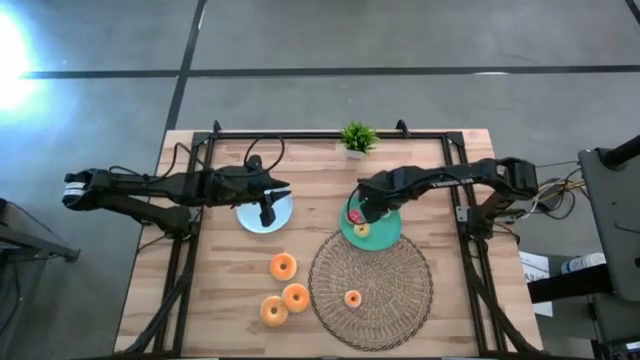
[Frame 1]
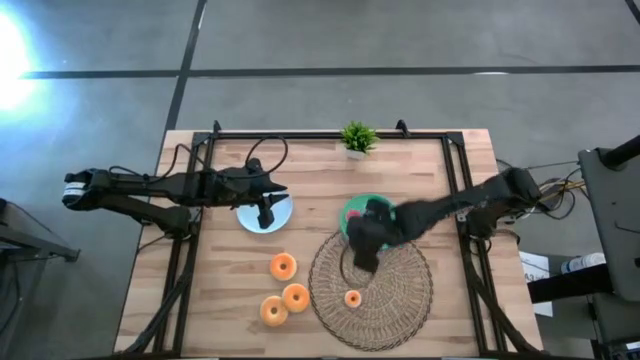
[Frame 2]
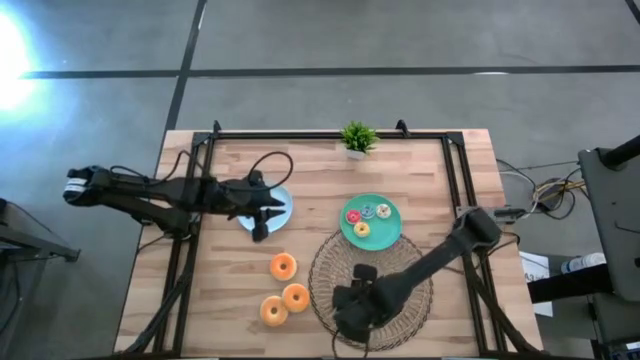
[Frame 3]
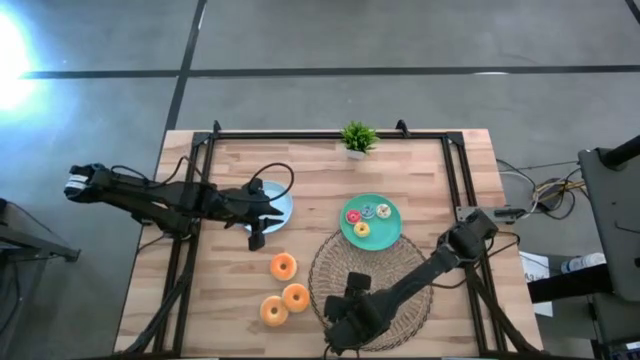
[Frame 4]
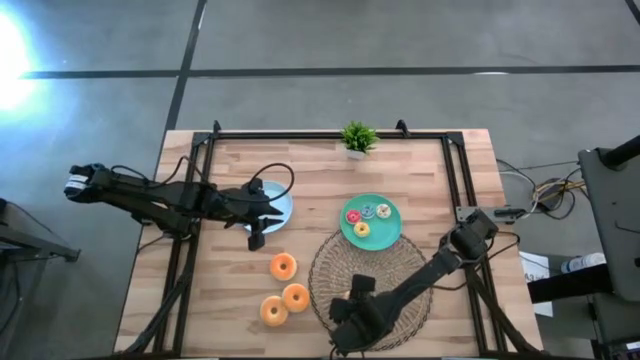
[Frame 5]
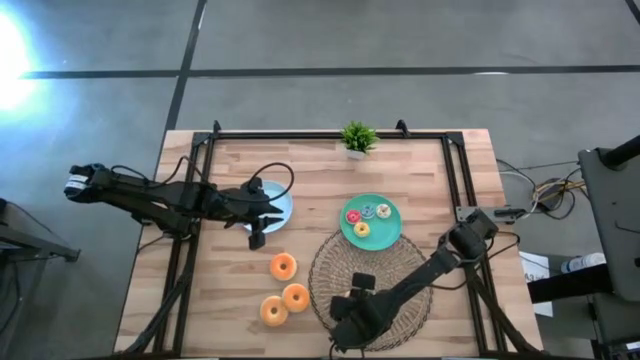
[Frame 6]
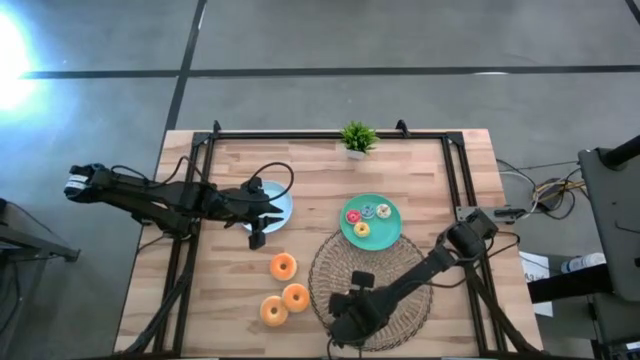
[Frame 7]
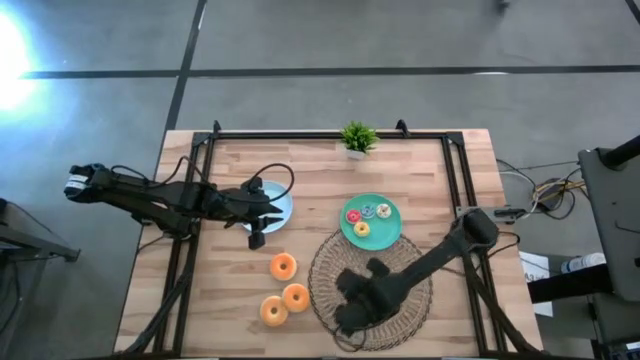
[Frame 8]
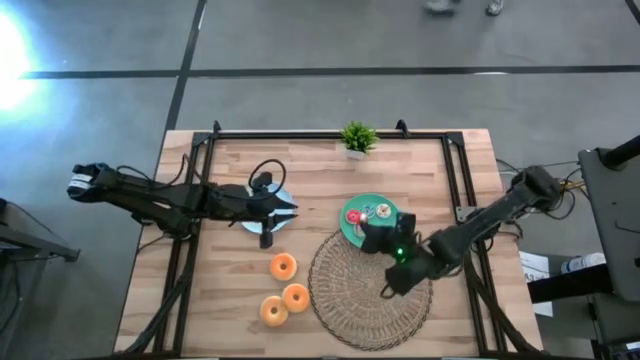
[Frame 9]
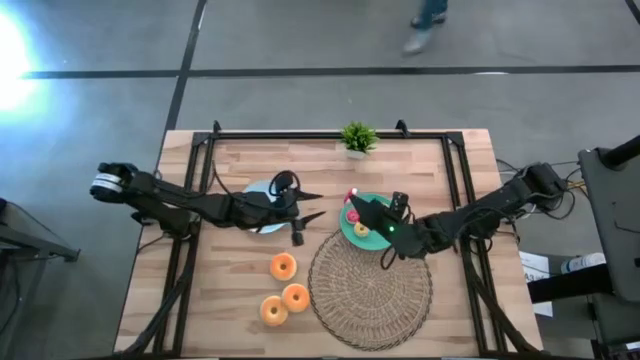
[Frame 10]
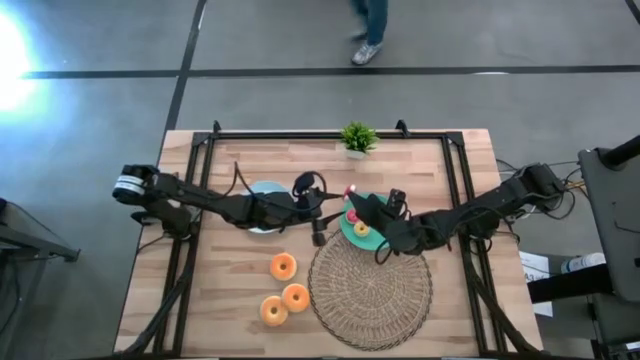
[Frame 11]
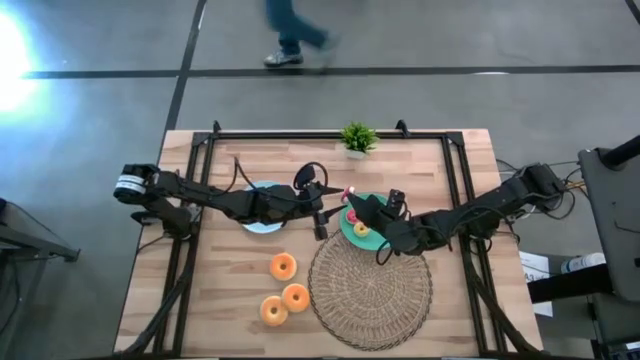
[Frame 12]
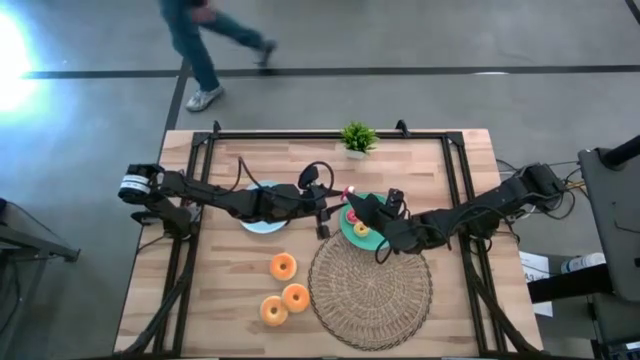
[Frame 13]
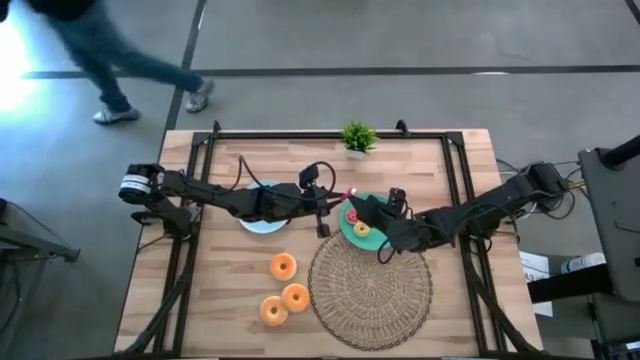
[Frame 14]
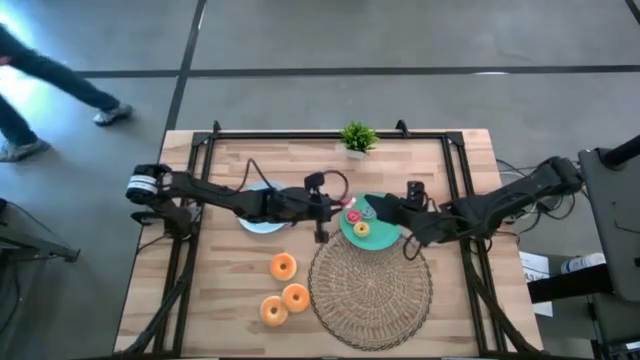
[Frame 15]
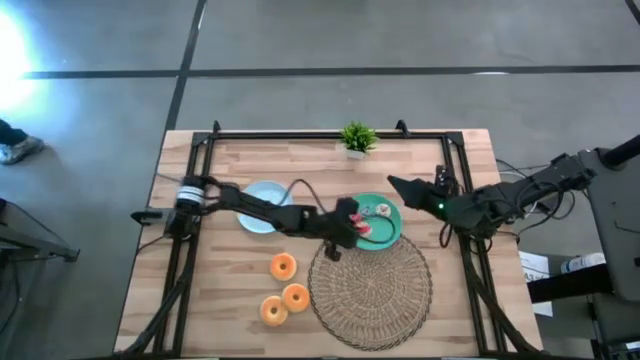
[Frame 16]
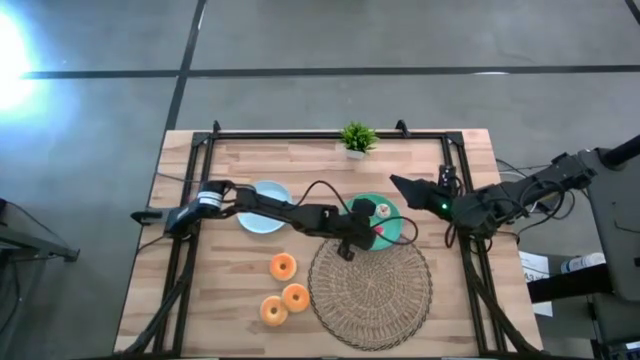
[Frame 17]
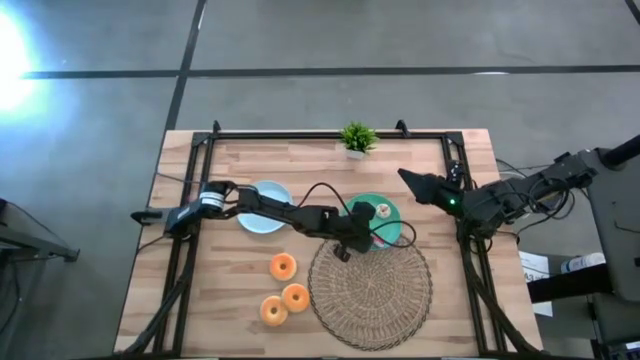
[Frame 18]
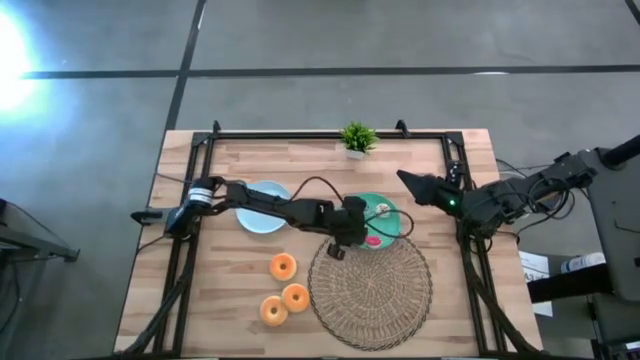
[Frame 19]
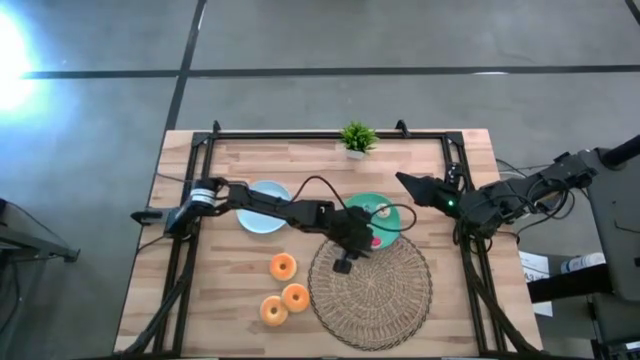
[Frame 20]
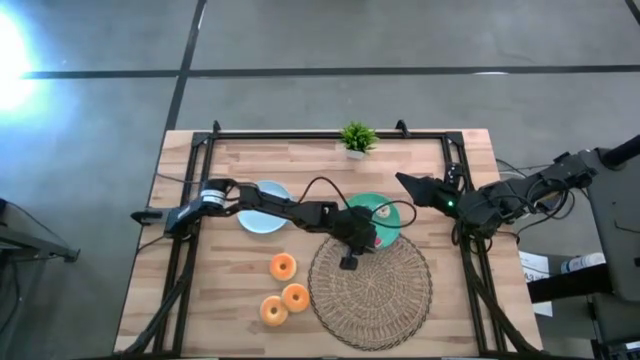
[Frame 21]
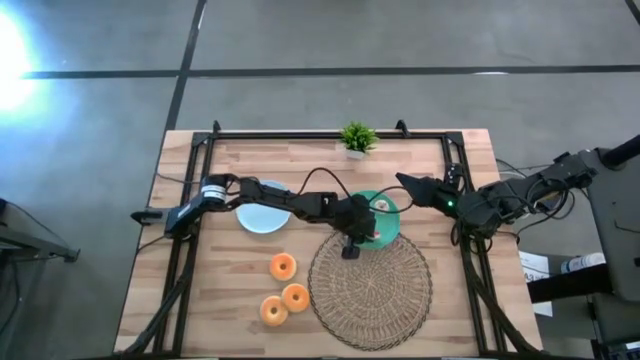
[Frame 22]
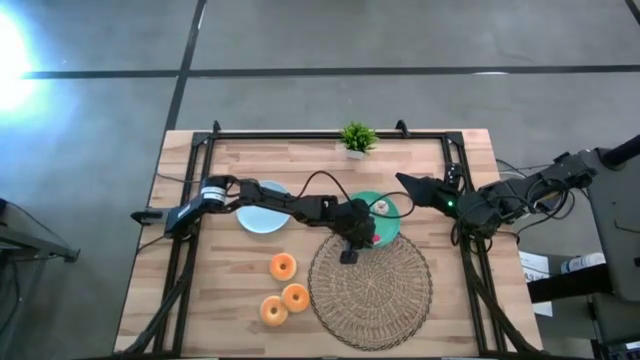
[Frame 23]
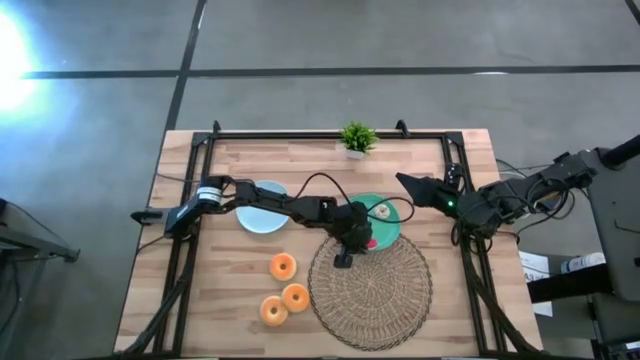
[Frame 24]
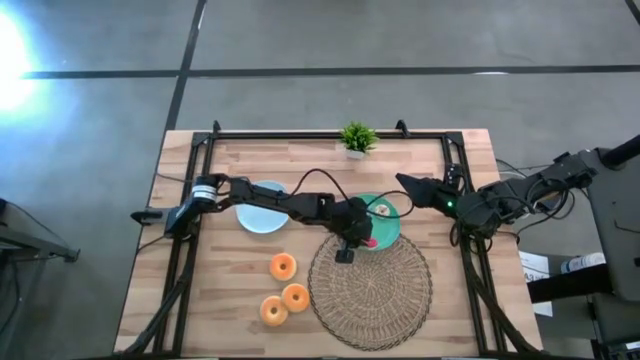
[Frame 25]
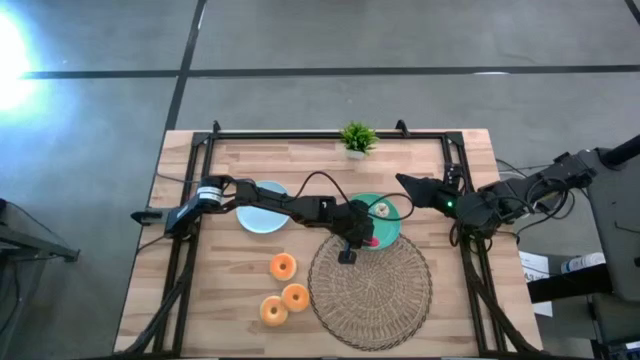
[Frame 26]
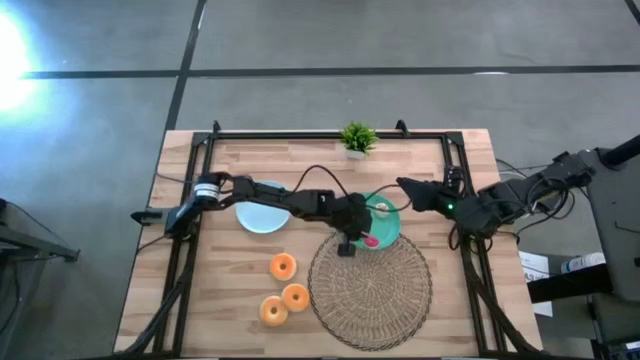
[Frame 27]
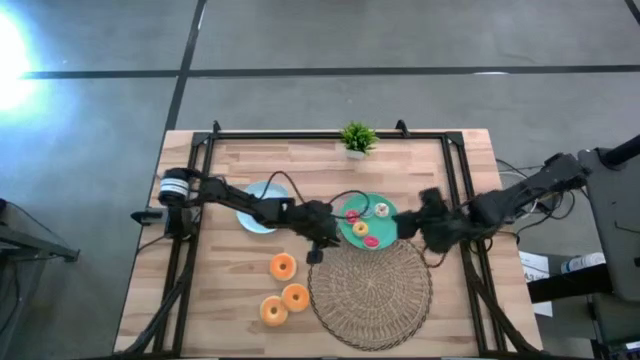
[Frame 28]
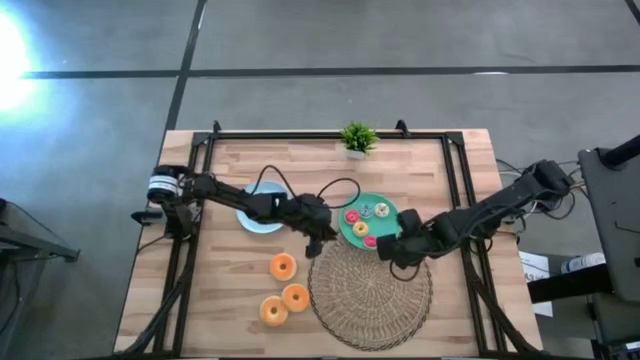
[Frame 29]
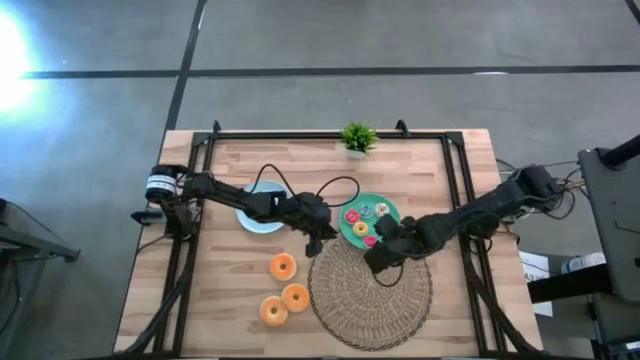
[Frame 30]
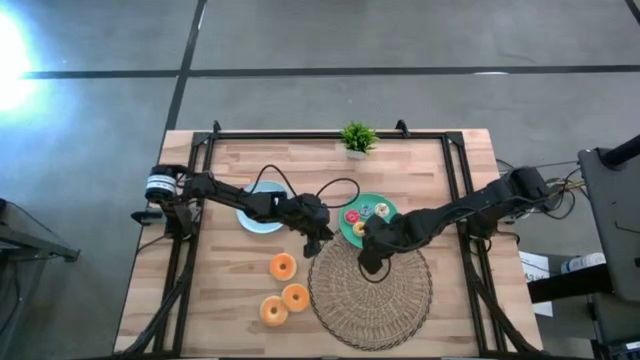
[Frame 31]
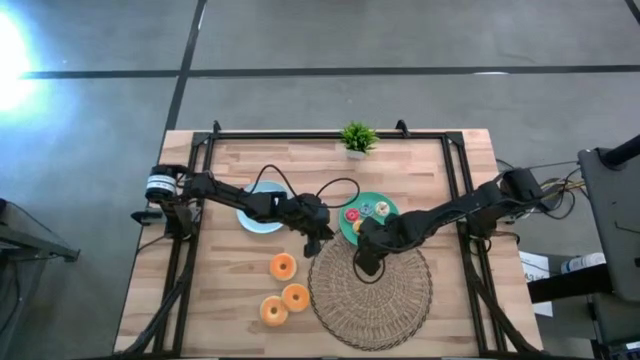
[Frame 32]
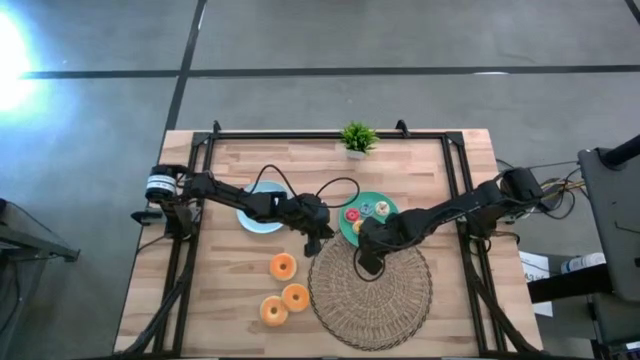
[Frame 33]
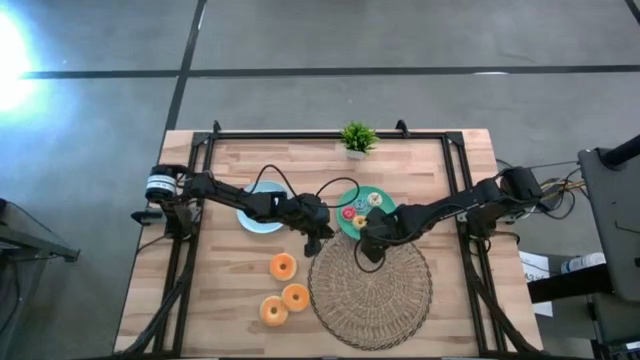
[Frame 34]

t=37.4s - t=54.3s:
Task: Pick & Place donuts
Put the small red donut on the green plate

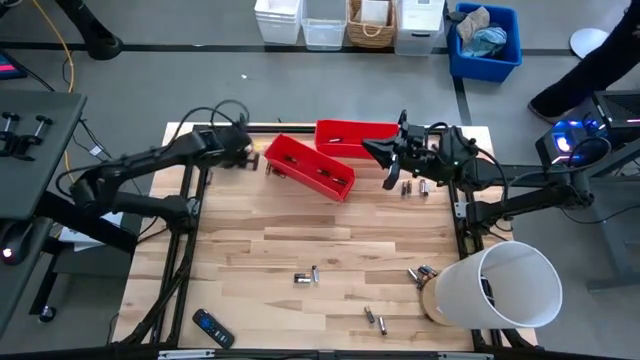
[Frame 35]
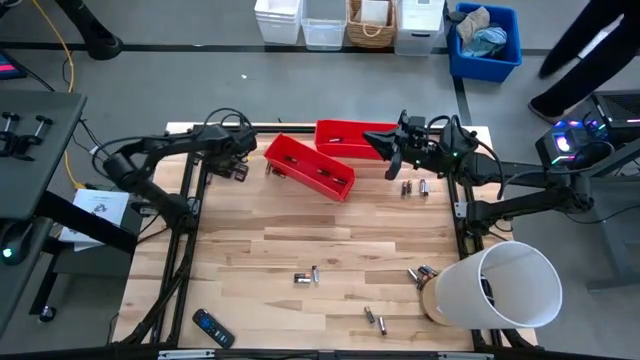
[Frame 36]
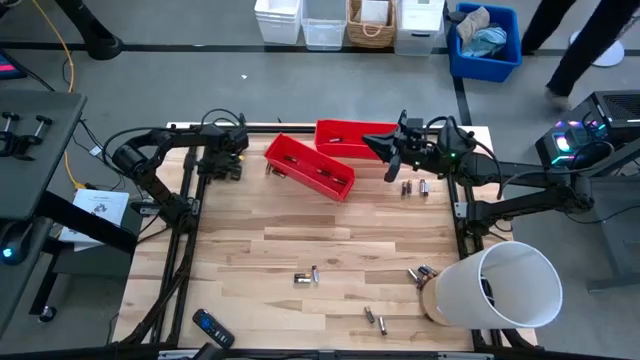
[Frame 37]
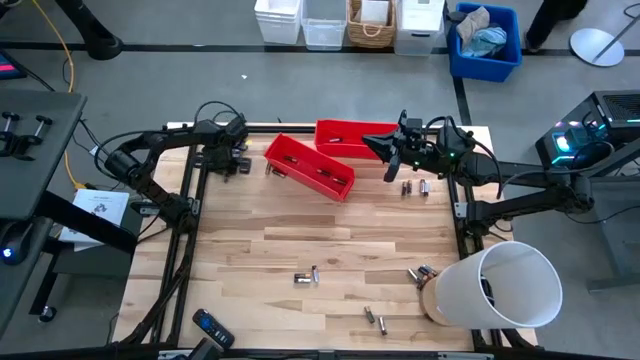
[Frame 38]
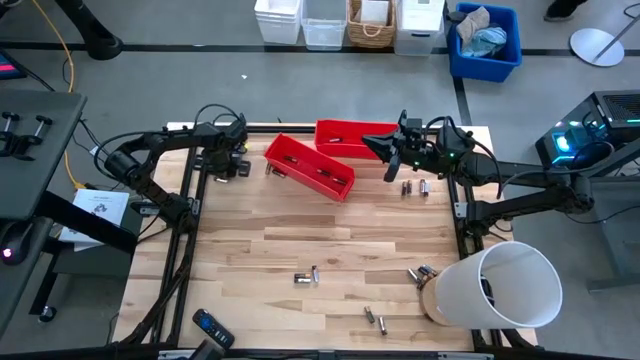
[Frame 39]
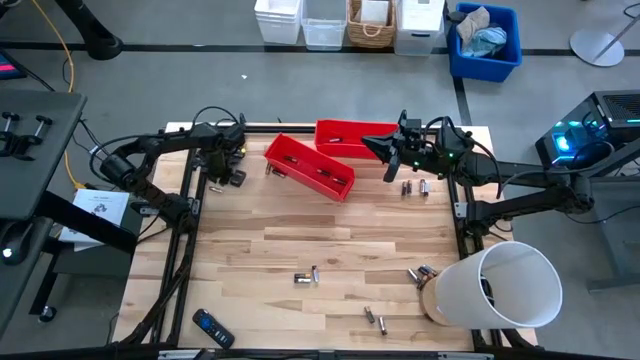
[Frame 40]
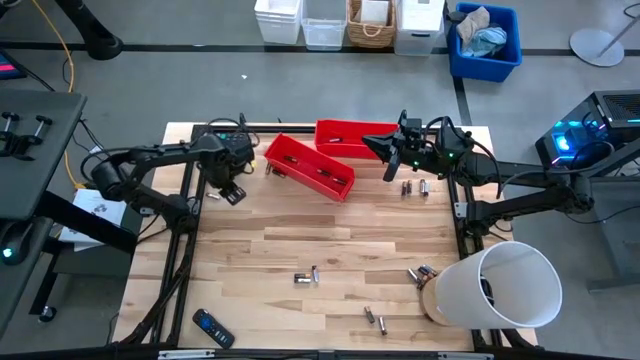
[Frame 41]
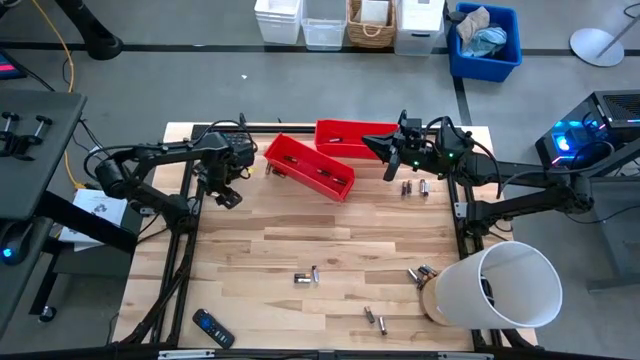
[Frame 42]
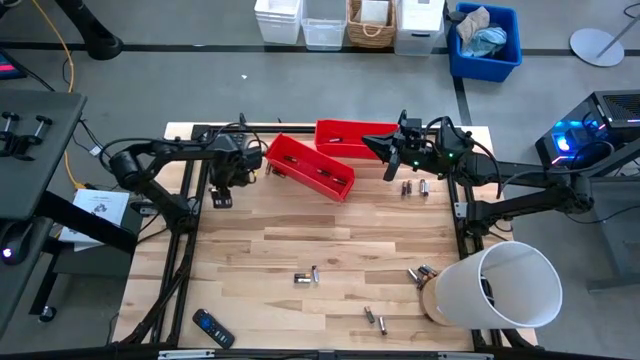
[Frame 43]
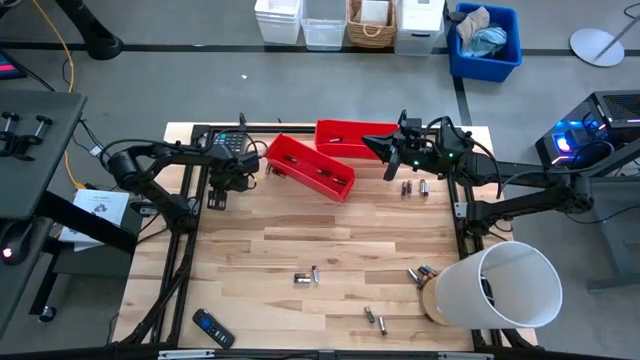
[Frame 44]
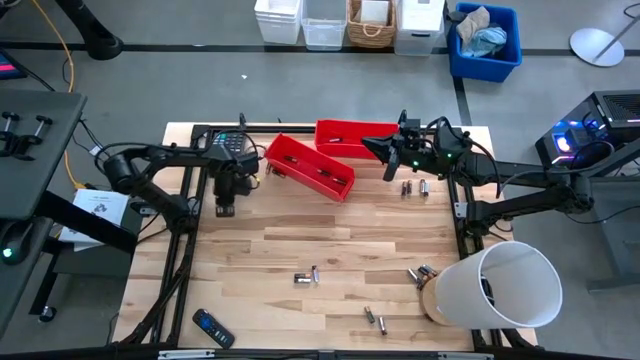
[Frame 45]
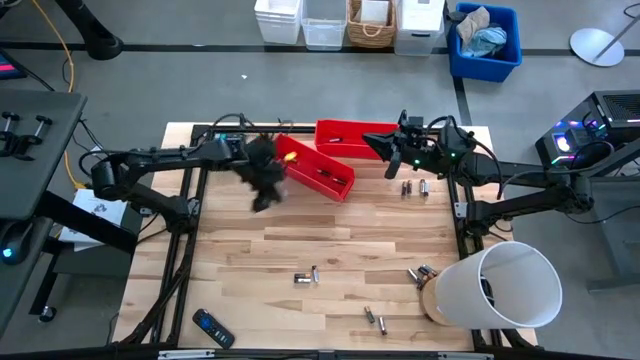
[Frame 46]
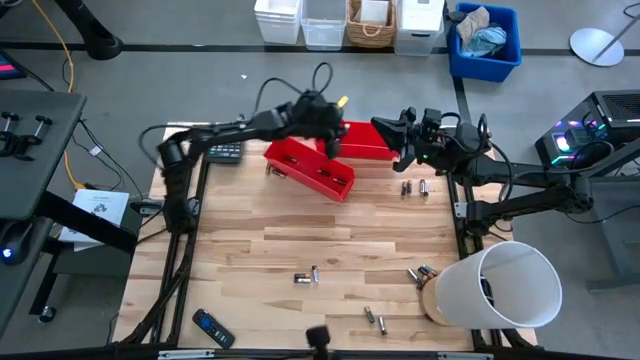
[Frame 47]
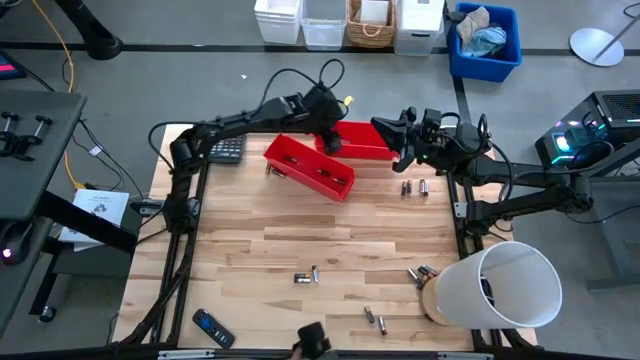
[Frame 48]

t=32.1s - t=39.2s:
Task: Sort batteries
Put the silver battery into the top red bin
